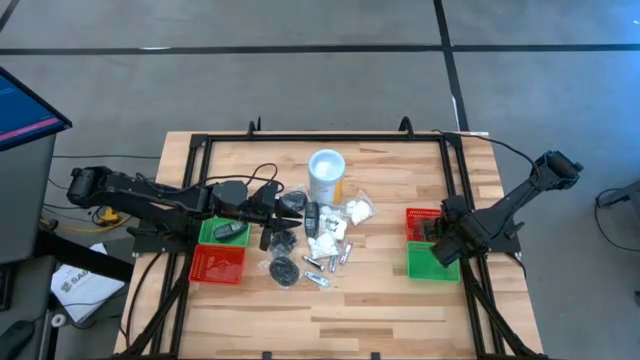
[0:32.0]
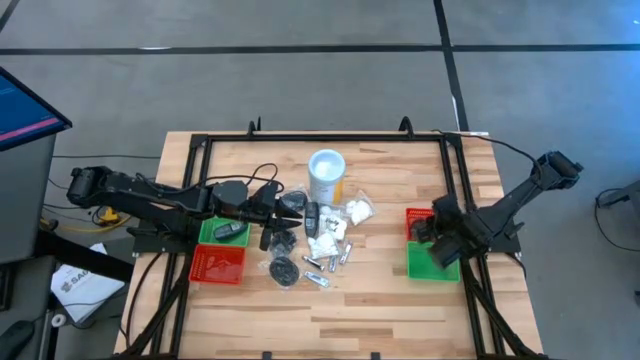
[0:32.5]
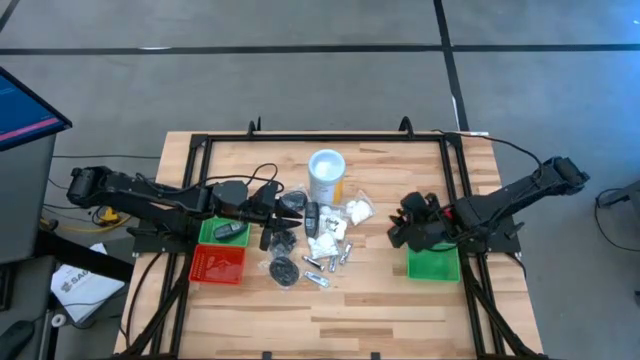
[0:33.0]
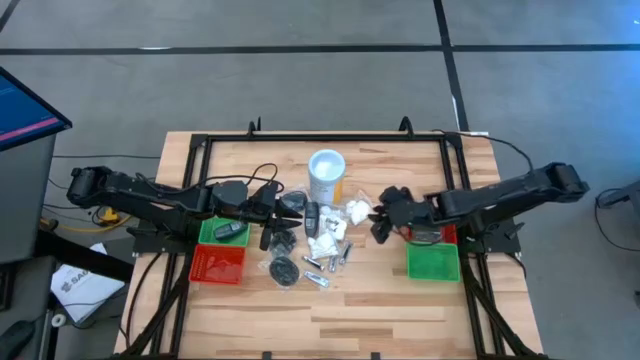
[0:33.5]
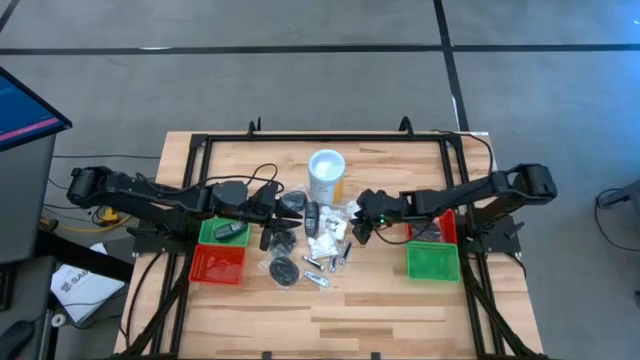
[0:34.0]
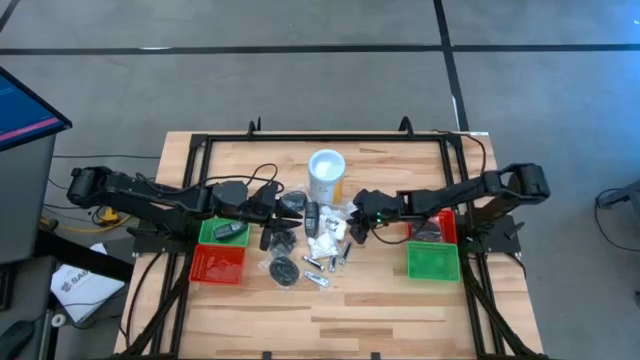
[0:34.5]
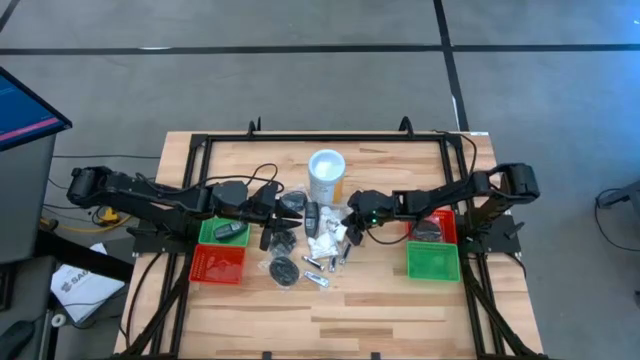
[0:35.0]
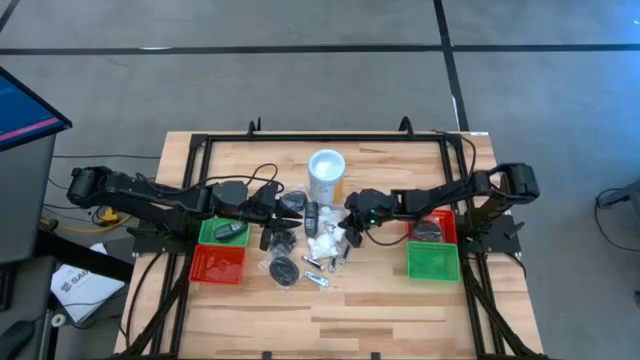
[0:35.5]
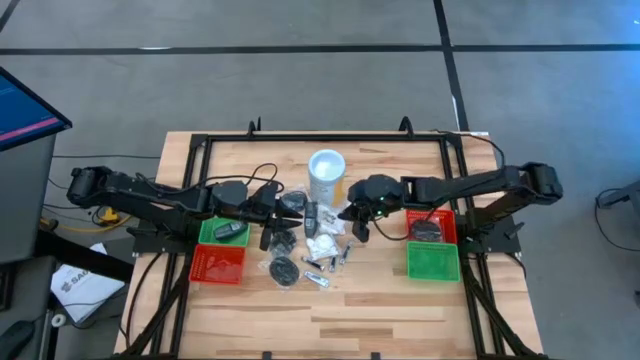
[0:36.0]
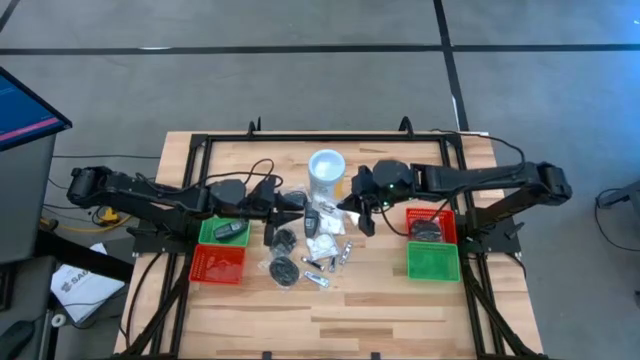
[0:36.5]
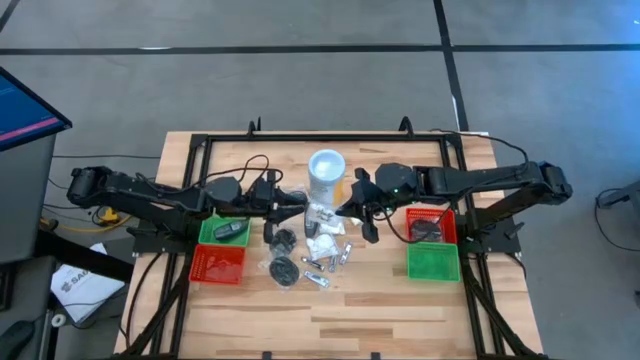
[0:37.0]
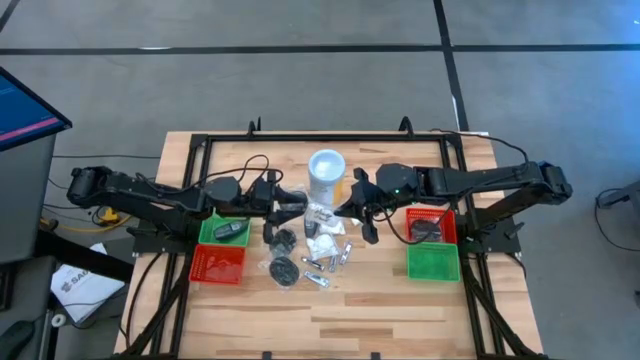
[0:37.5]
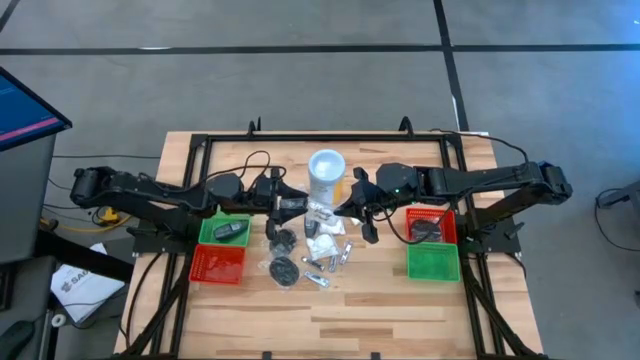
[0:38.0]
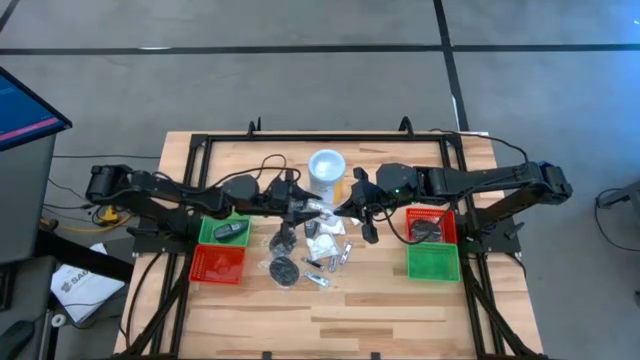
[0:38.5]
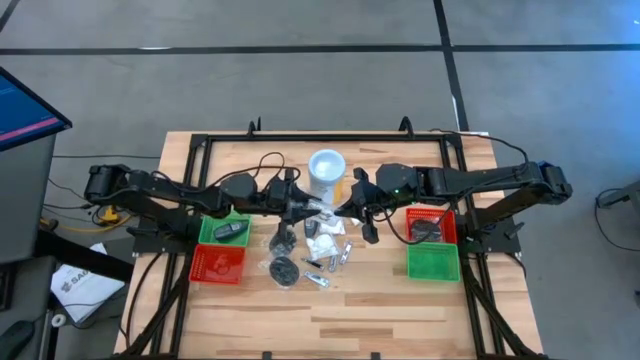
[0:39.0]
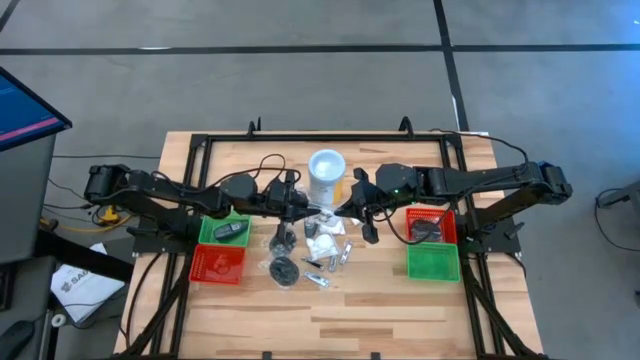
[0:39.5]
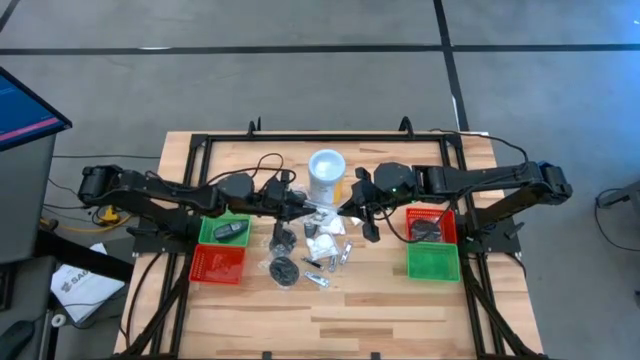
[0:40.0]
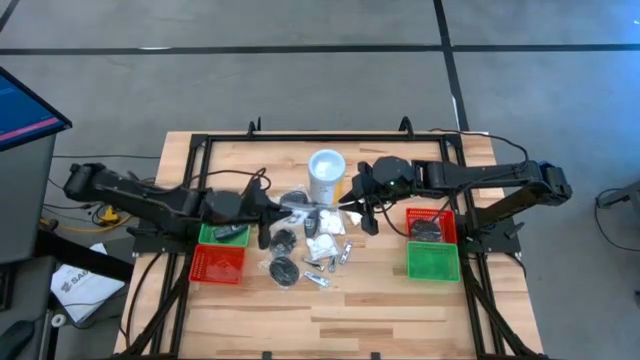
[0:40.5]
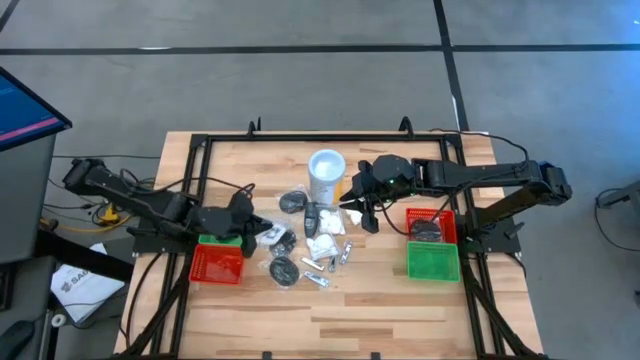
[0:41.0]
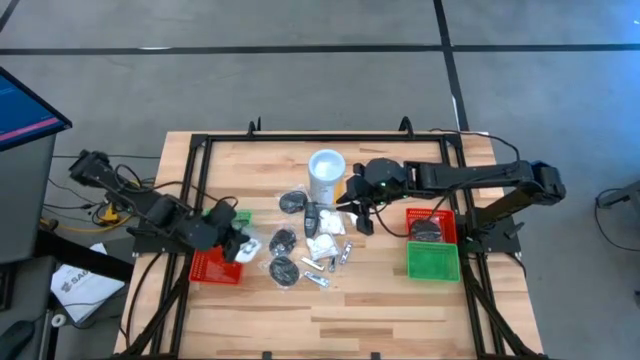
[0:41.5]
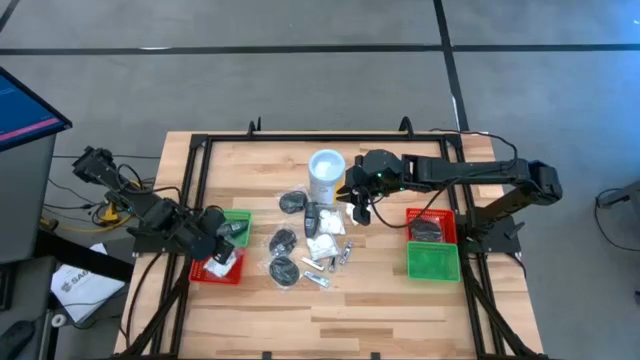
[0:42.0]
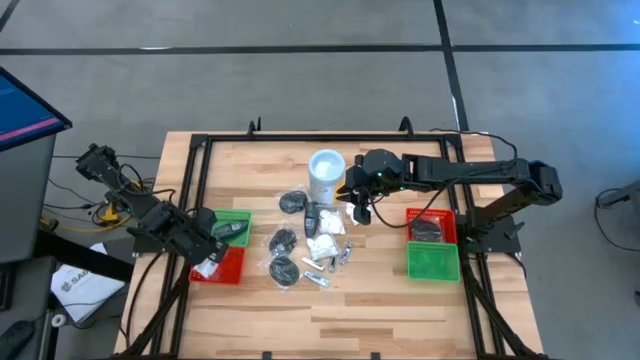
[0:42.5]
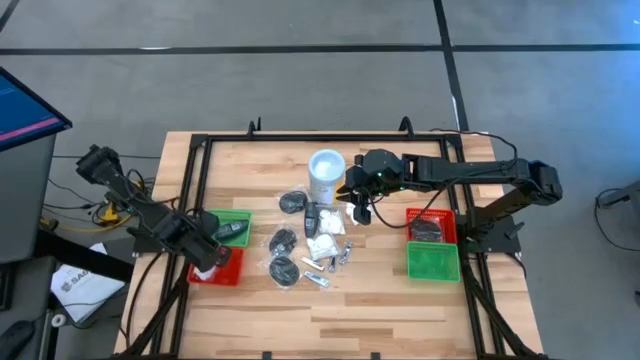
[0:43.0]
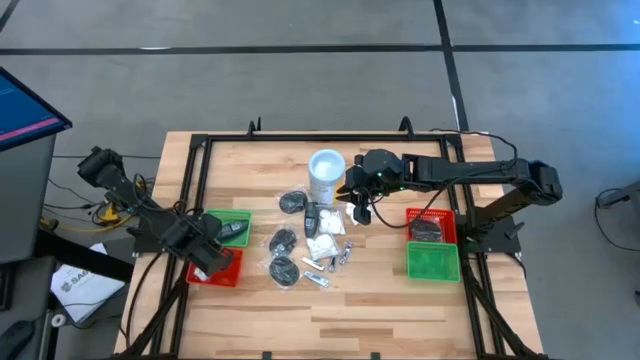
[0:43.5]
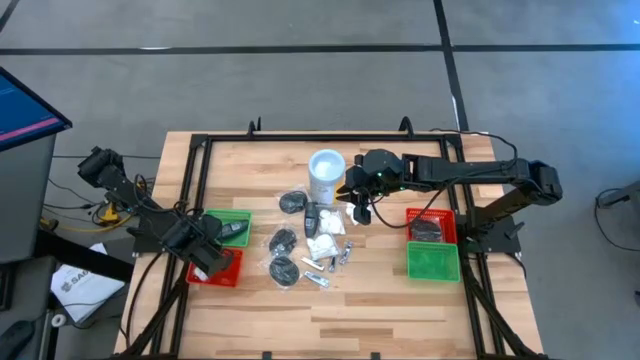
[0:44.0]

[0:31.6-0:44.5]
Task: Pick & Place Travel size toiletries
Put the cotton pack into the left red bin

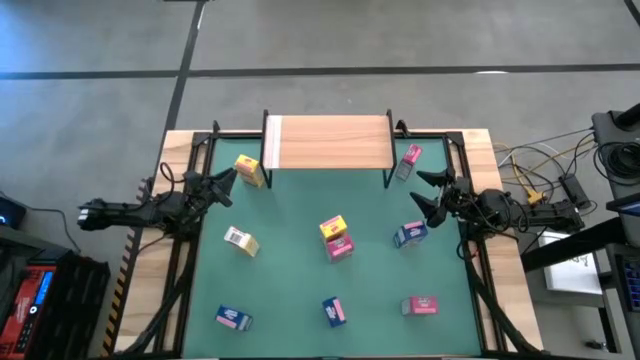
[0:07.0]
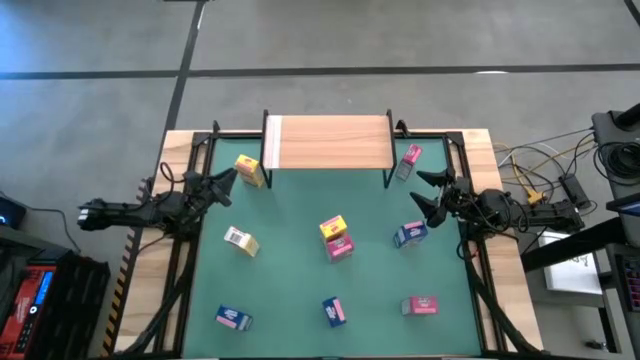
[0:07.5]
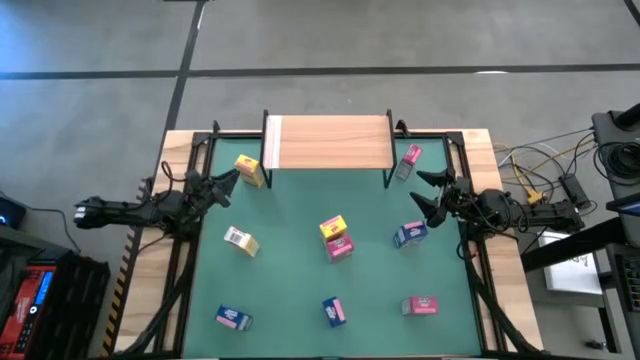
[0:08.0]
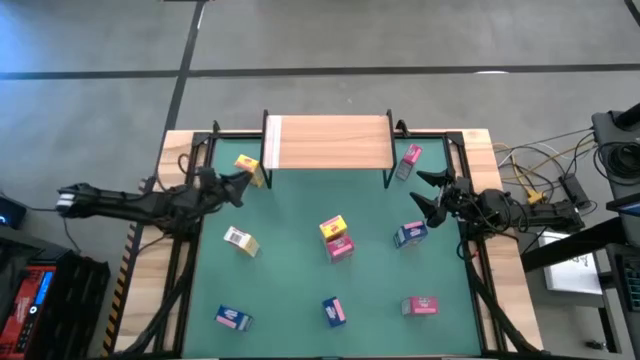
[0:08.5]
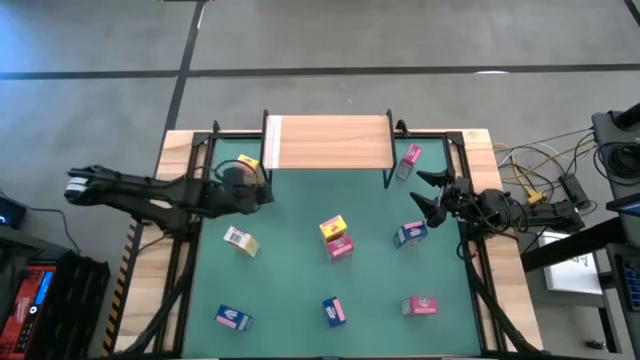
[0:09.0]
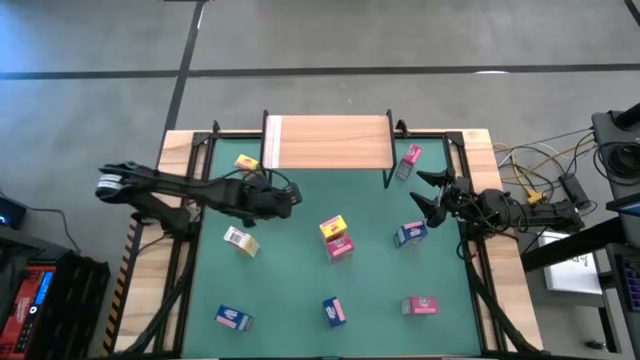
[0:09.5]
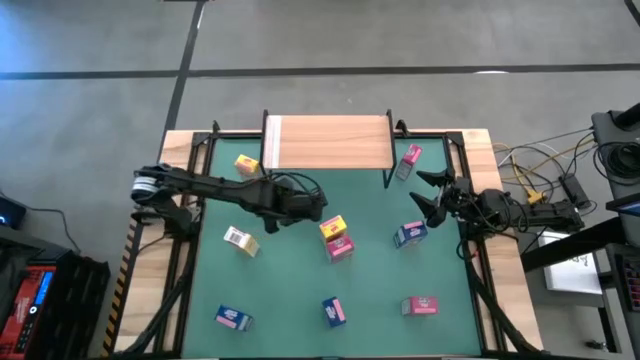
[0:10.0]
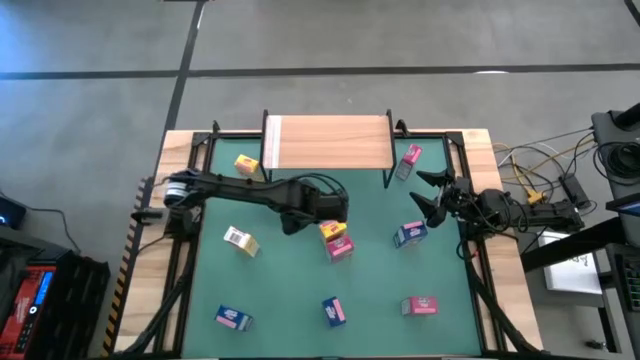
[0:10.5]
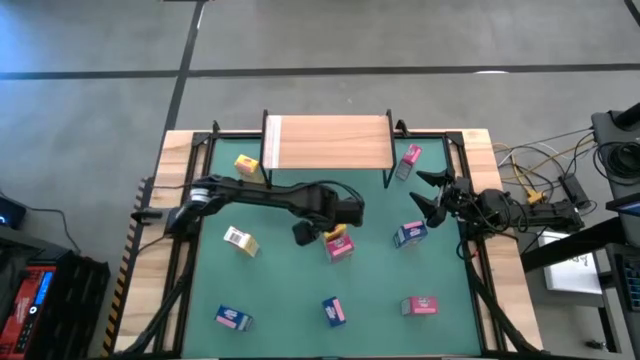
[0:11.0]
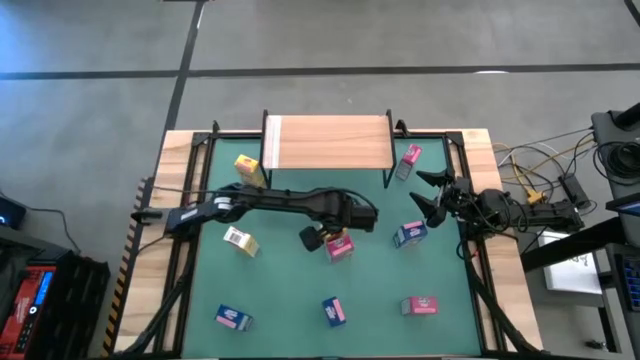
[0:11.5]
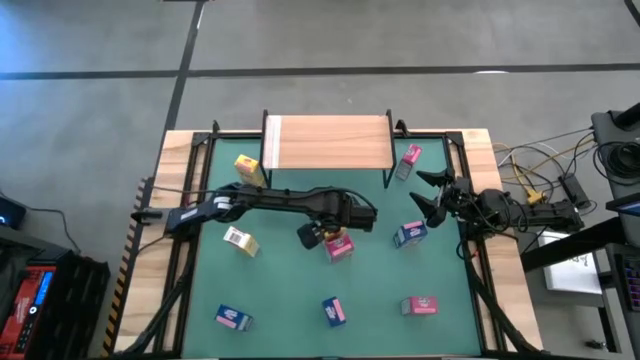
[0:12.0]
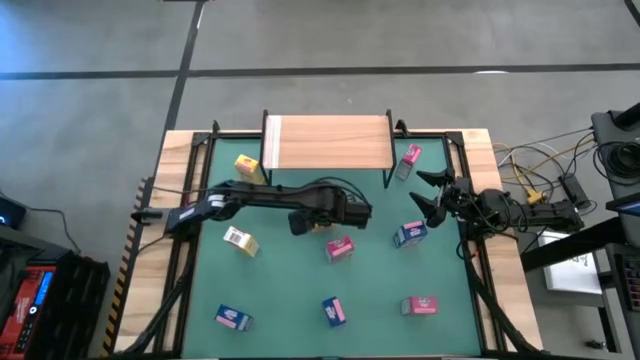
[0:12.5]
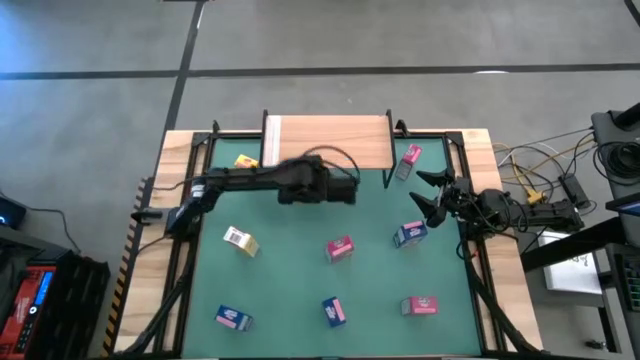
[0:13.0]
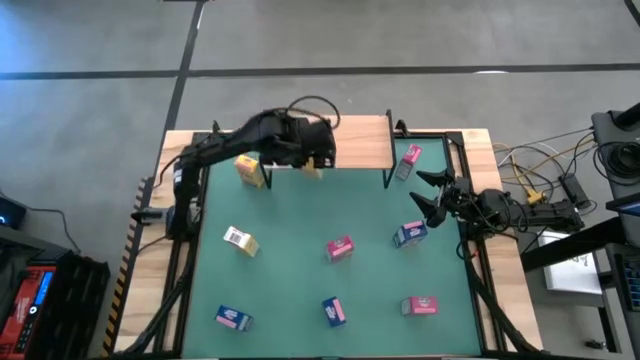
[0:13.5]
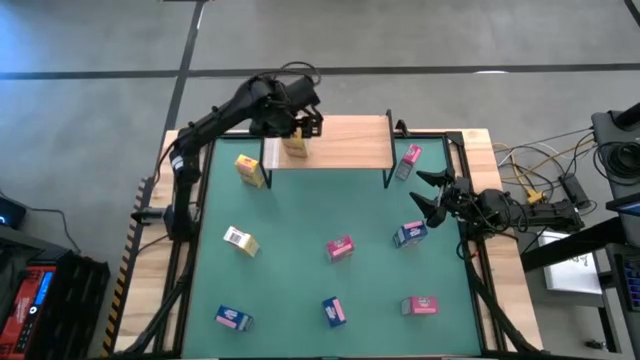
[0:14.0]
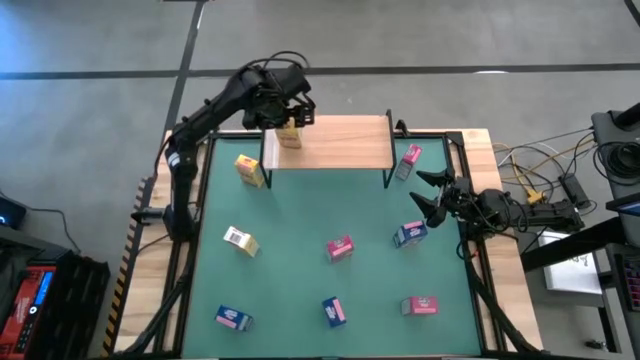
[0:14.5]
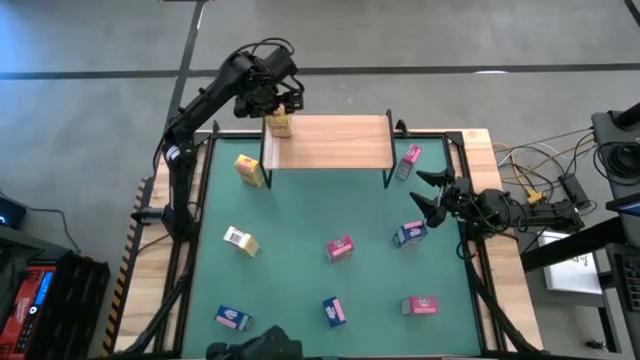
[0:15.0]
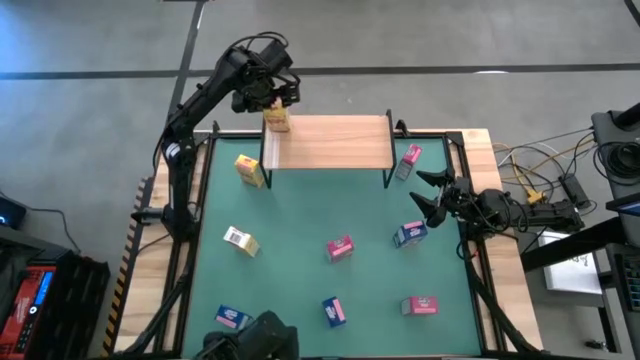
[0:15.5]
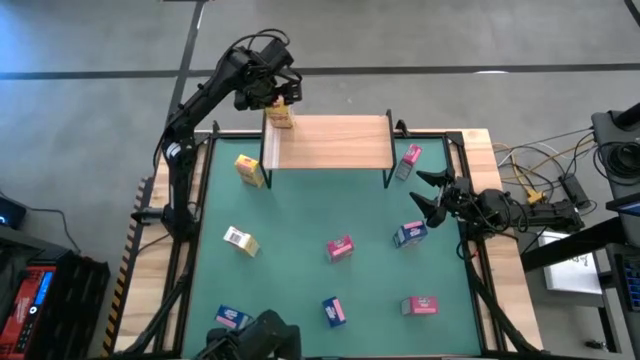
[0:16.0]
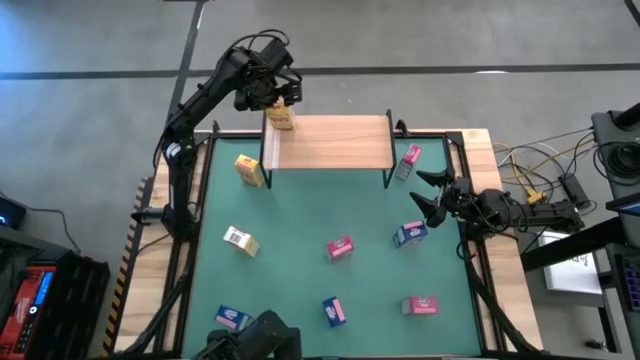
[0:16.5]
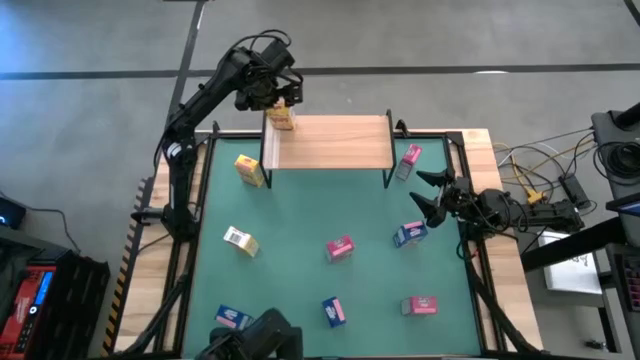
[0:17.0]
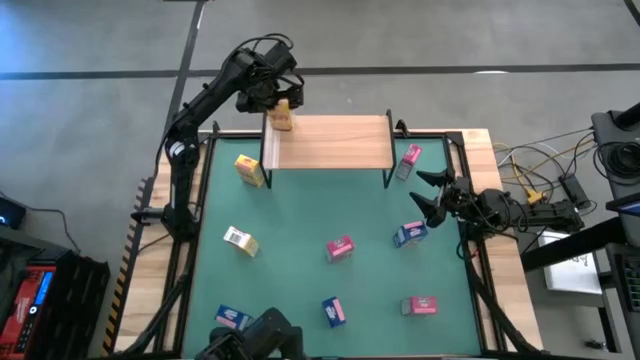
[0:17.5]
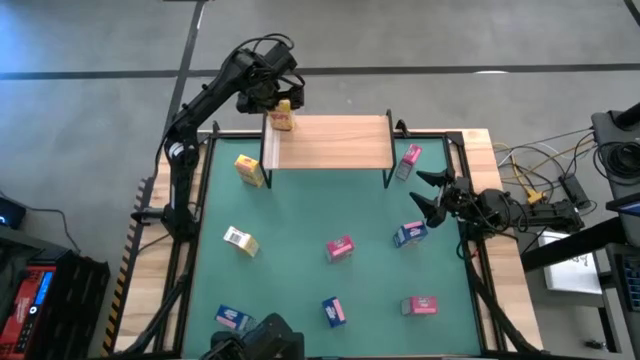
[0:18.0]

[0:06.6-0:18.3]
Task: Stack cereal on shelf
Put the bottom right yellow cereal box on the shelf
